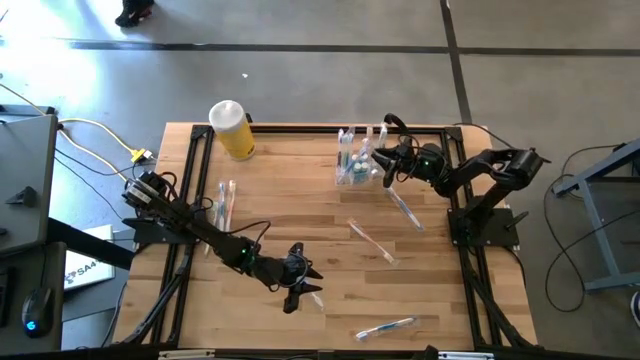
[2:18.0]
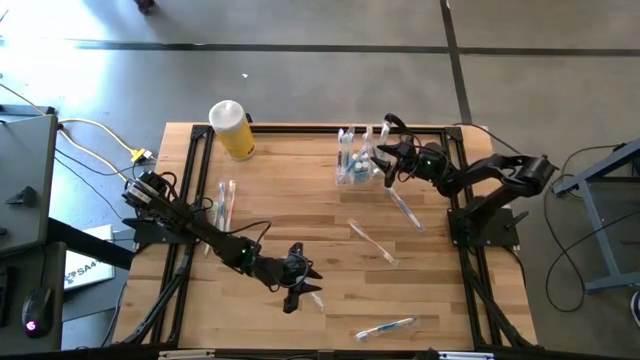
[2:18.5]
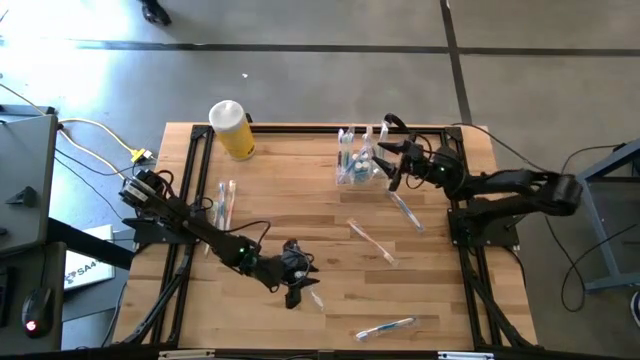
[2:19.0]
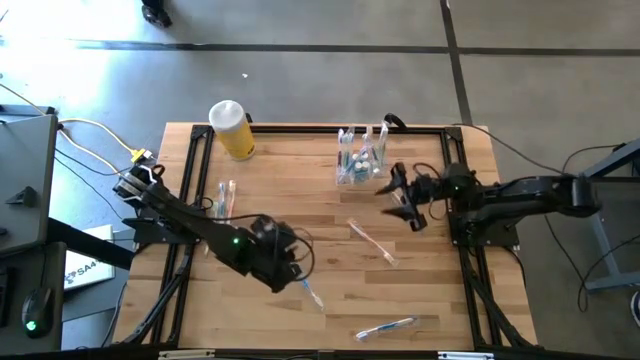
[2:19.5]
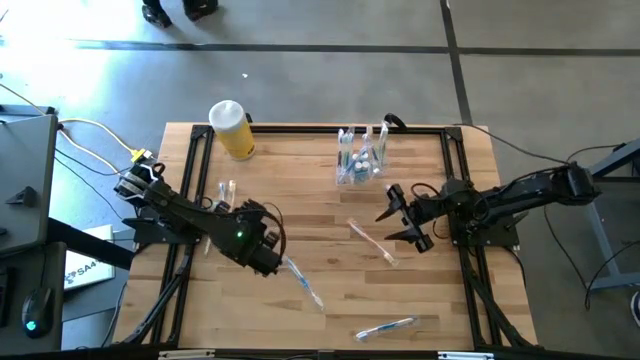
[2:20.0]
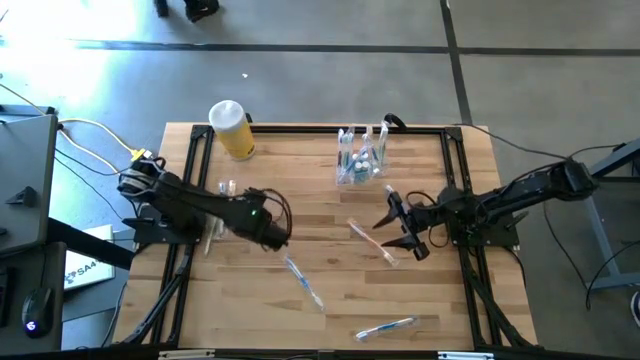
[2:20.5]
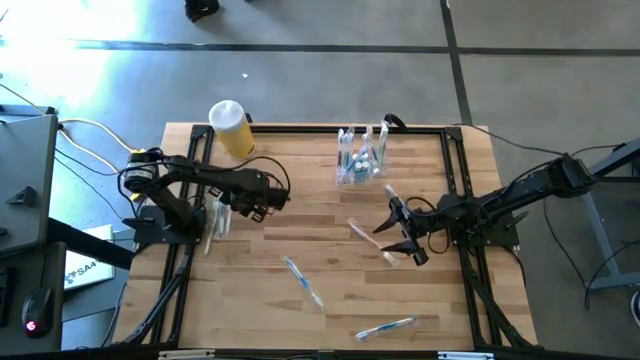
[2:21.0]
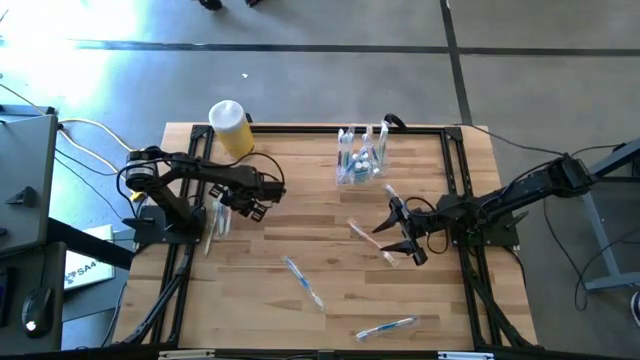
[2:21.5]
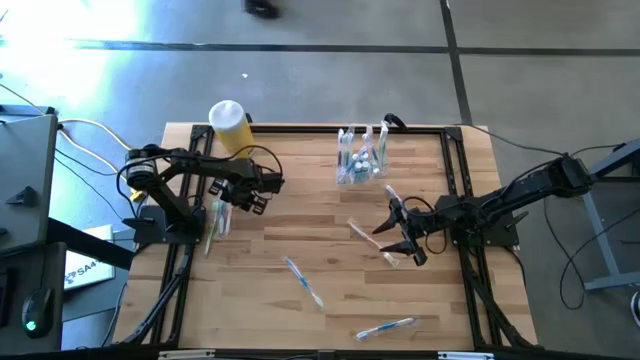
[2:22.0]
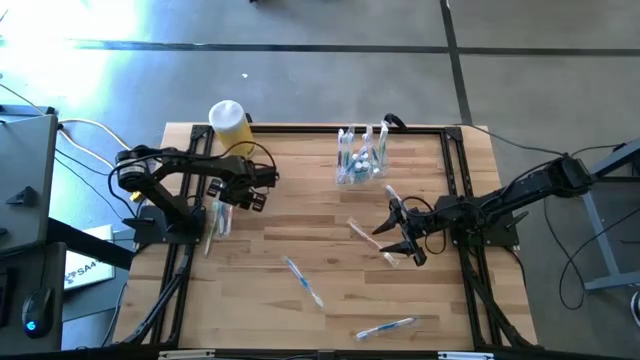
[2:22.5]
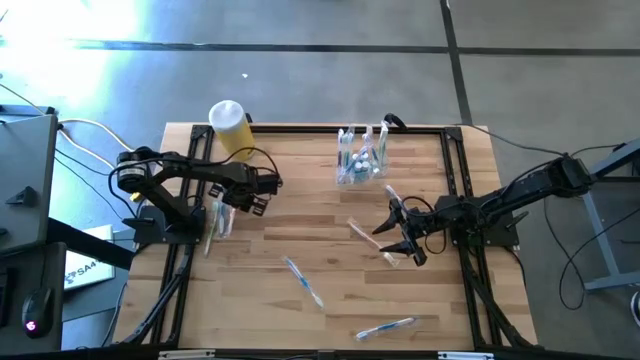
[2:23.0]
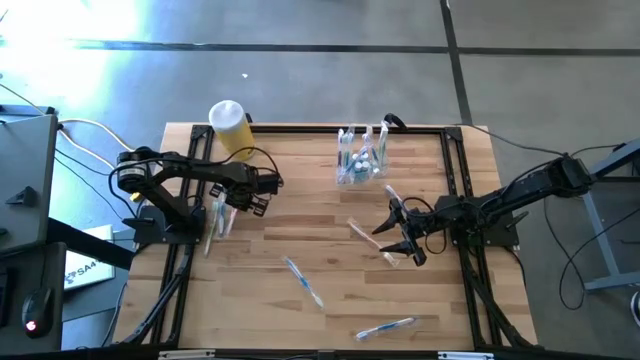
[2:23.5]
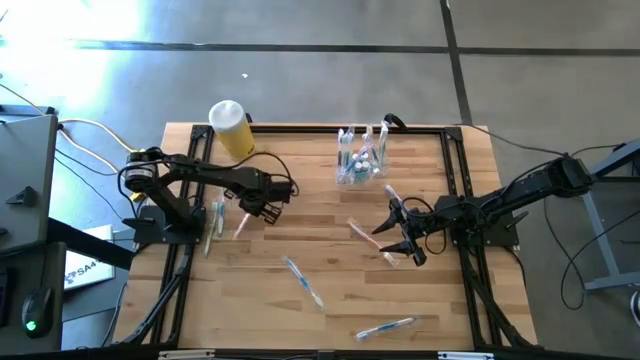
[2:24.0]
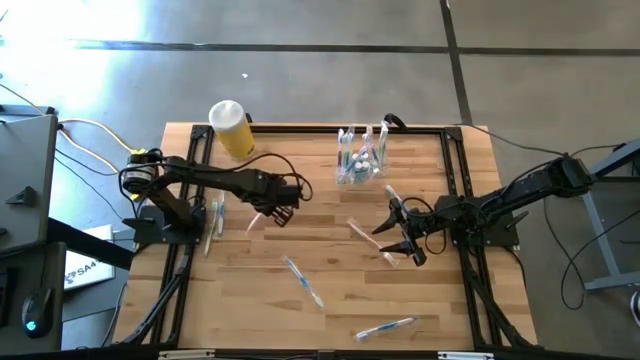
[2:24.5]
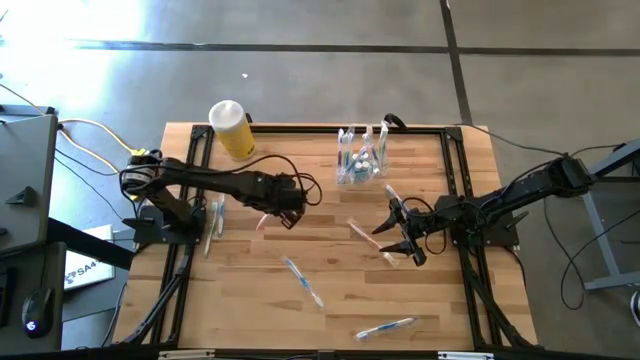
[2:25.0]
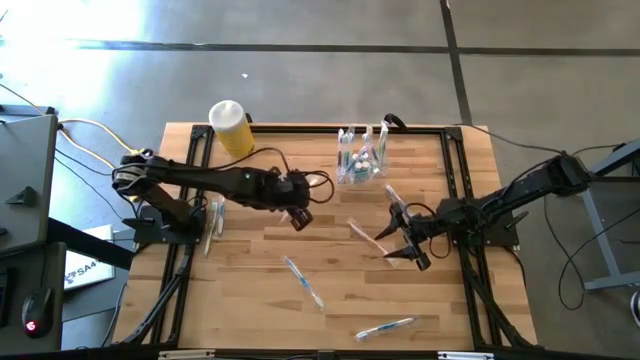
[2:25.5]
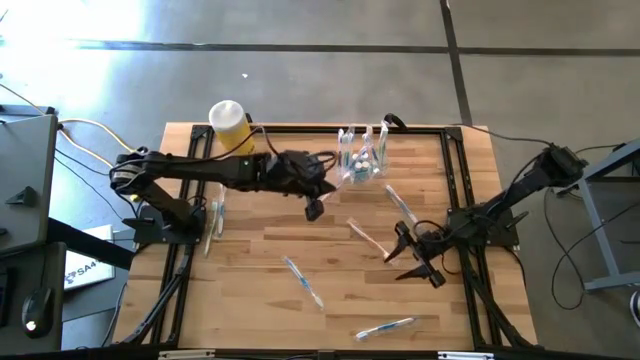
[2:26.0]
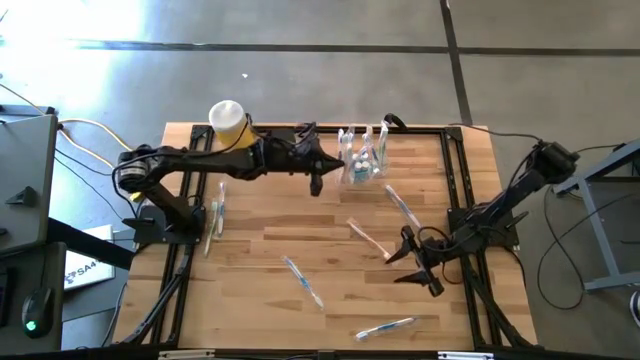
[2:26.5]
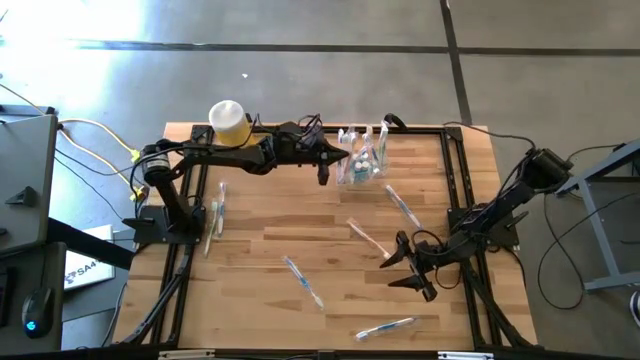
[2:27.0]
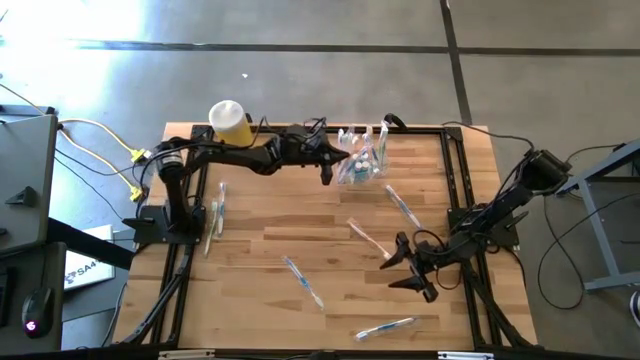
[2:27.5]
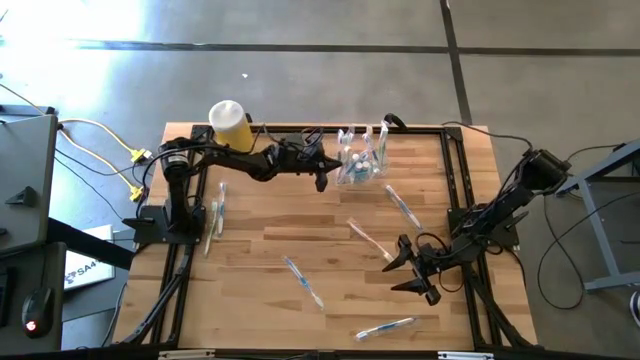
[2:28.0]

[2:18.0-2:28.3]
Task: Pick & Place toothbrushing station
Put the orange toothbrush into the transparent organizer

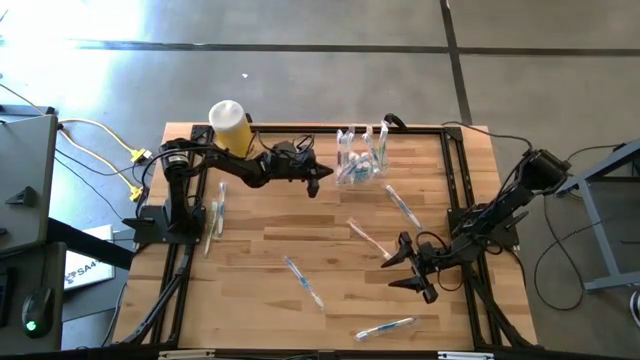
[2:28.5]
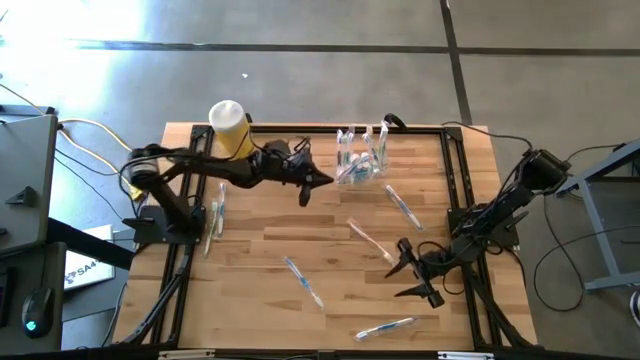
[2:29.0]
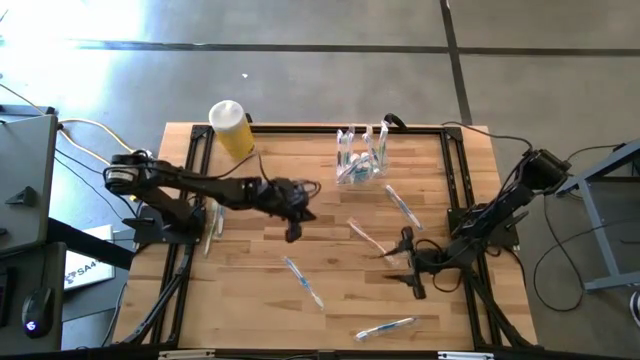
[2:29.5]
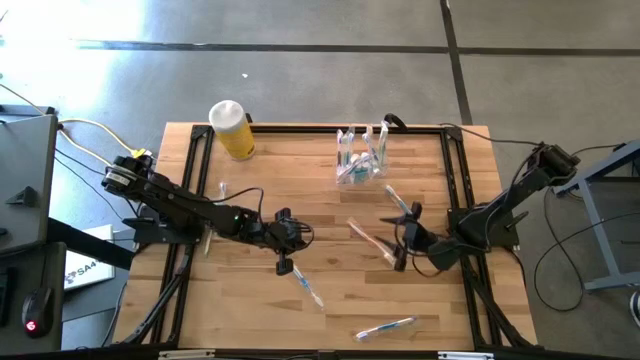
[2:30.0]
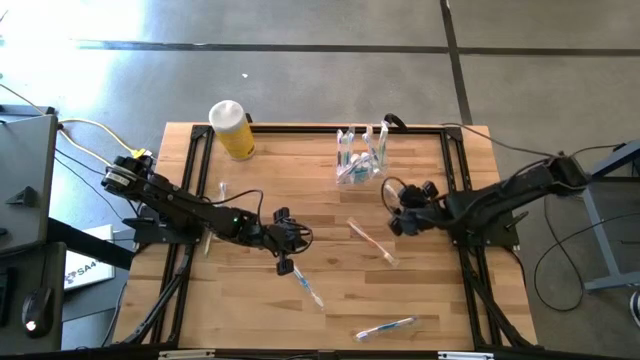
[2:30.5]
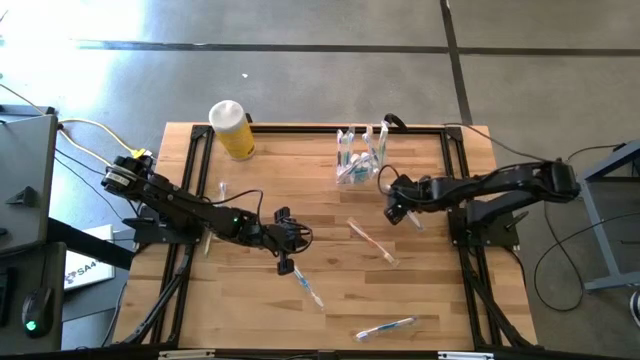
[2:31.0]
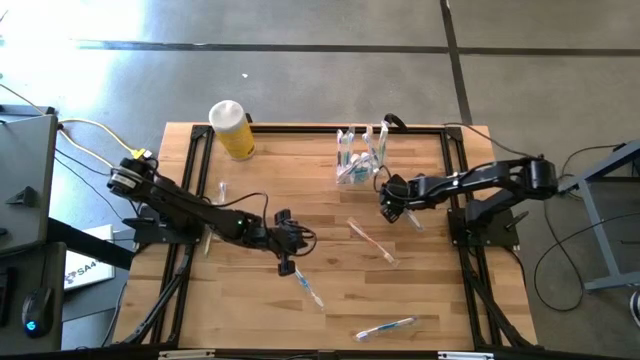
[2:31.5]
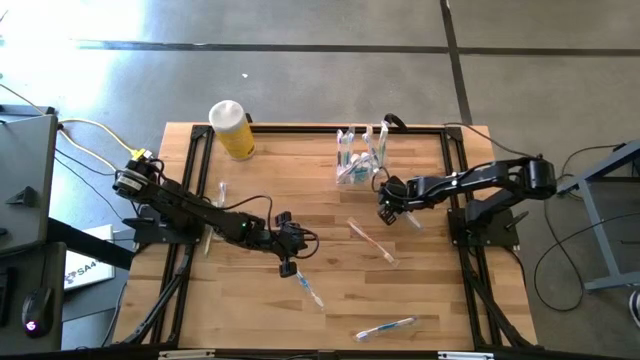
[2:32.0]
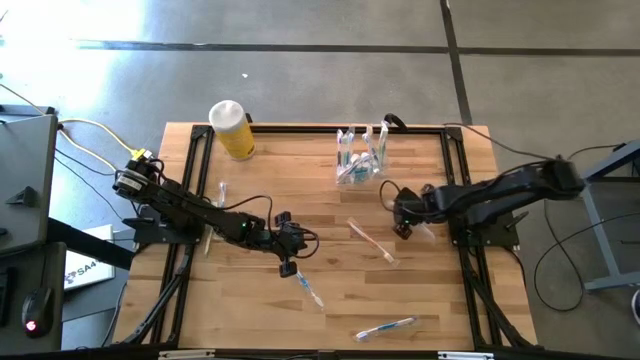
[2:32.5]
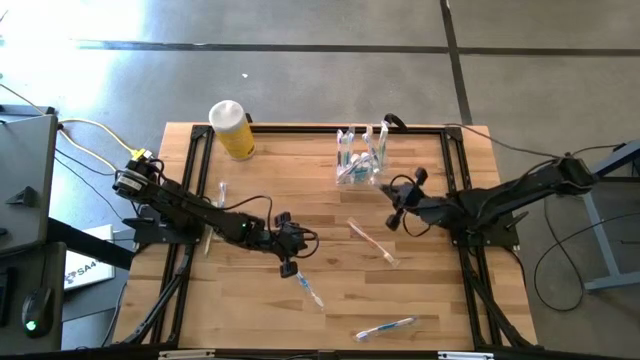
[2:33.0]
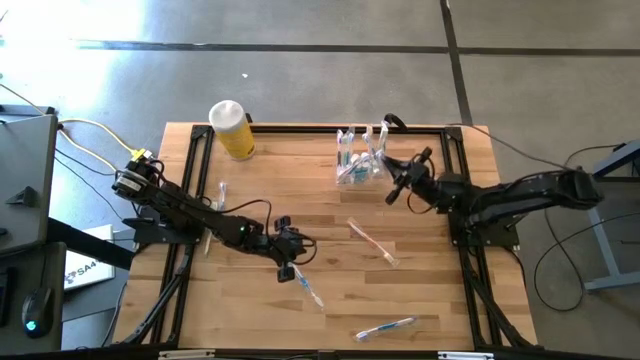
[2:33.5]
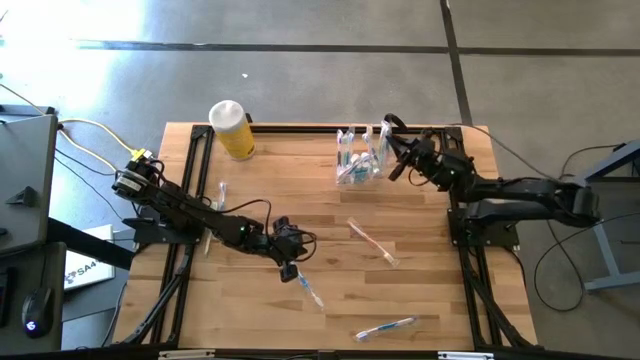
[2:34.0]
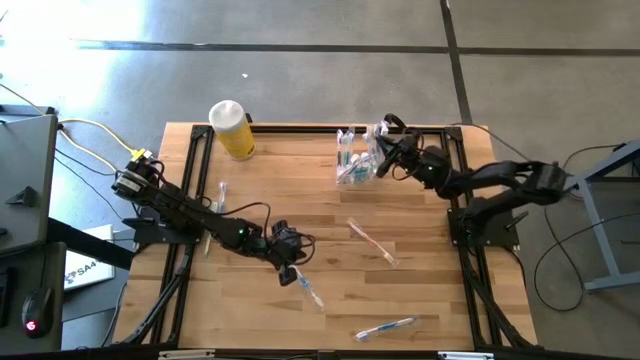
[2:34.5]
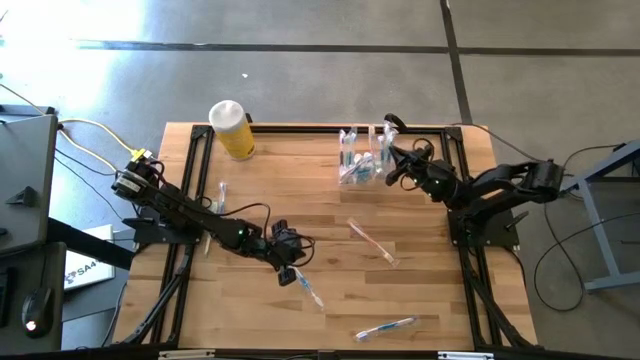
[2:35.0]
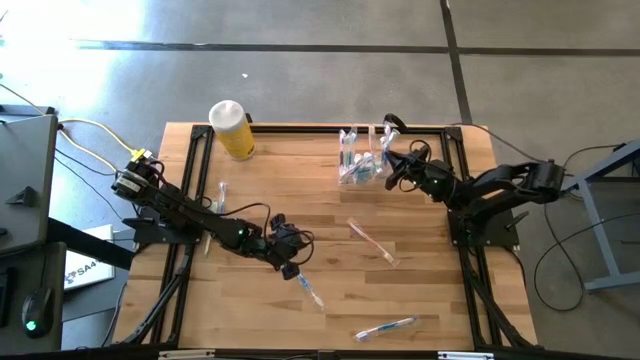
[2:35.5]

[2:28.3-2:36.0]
Put the blue toothbrush into the transparent organizer

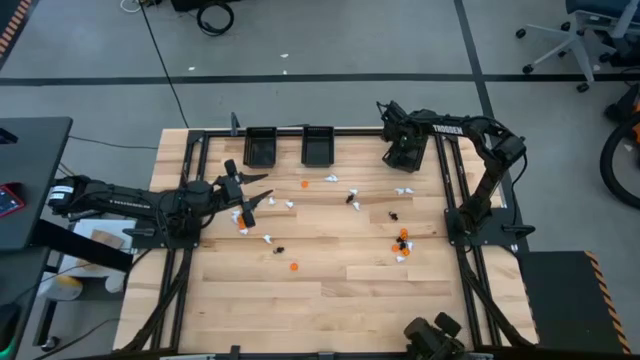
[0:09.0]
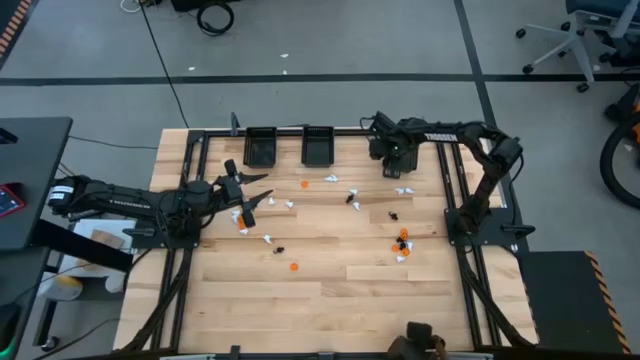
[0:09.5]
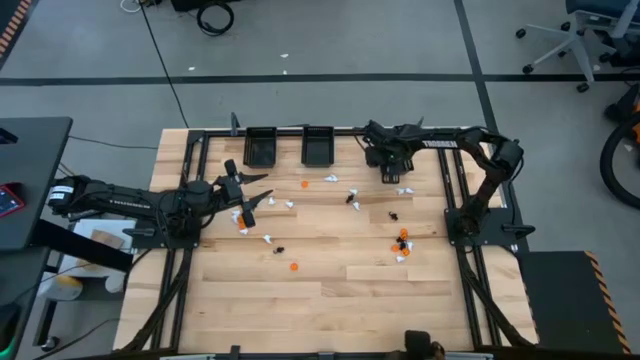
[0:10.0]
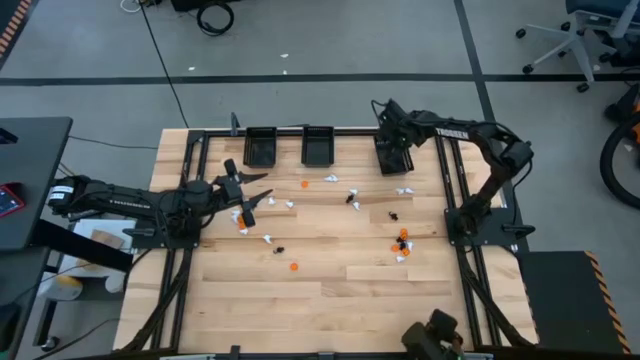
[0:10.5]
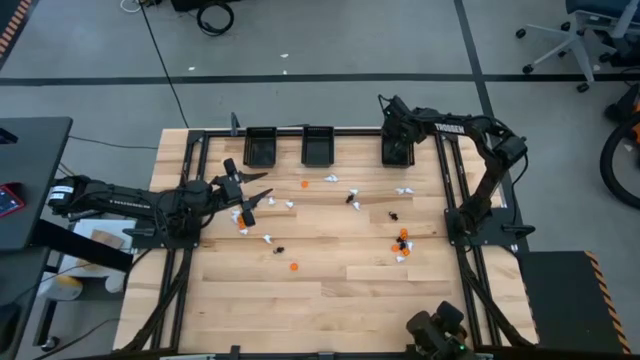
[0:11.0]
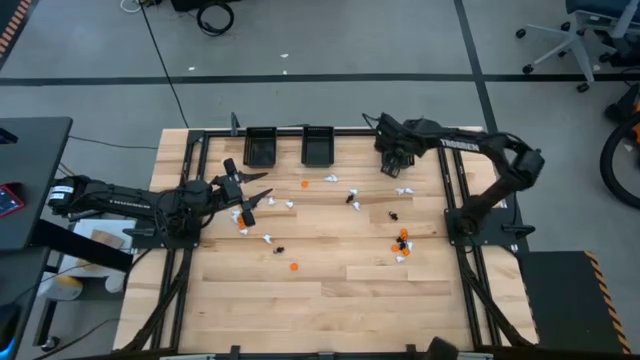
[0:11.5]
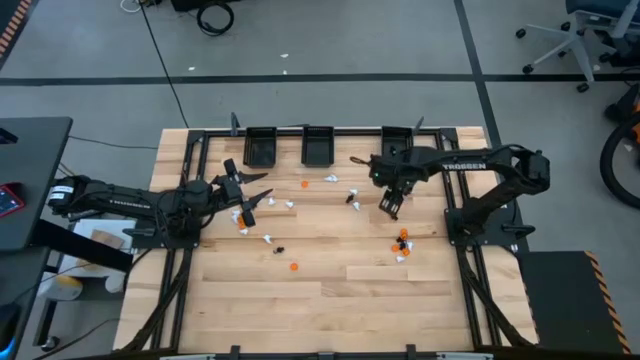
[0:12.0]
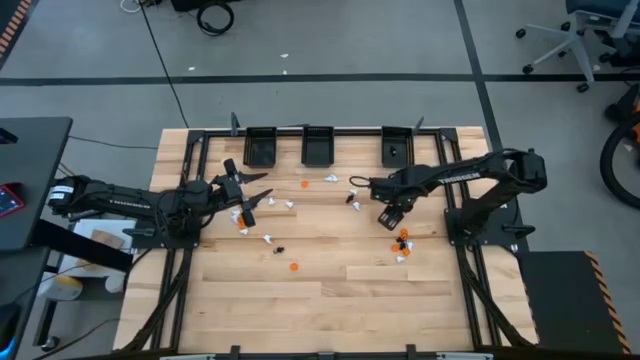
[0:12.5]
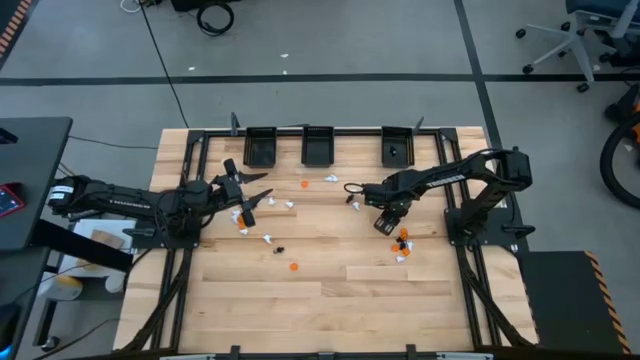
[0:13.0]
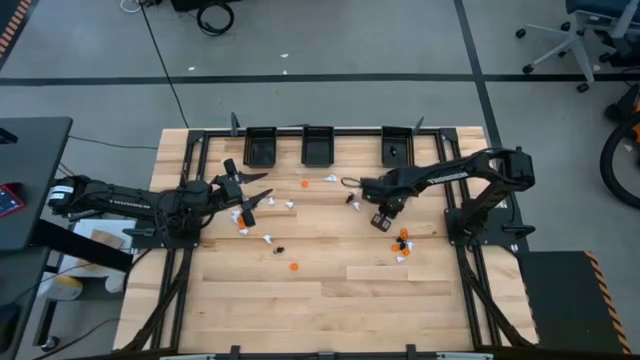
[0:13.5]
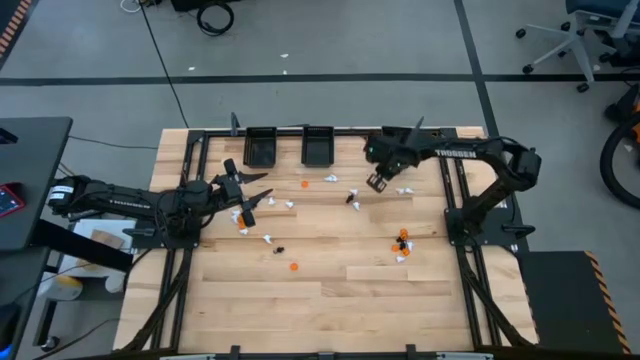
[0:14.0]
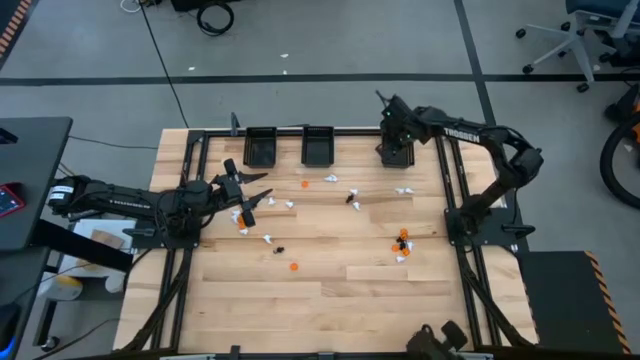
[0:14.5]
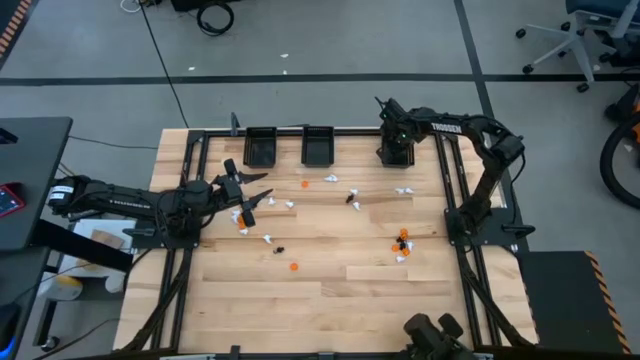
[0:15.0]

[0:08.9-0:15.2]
Task: Sort Halloween decoration
Put the black voodoo toy into the right black bin
